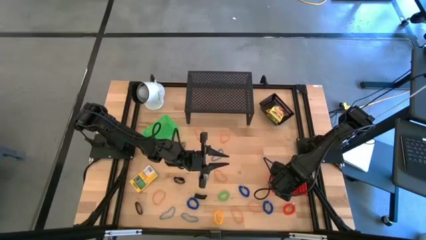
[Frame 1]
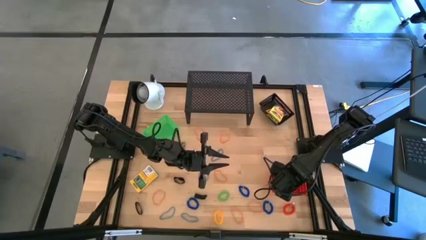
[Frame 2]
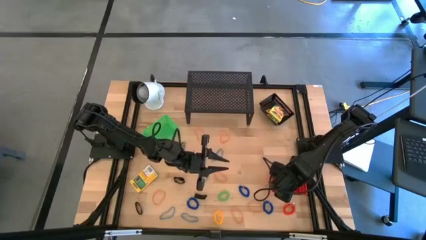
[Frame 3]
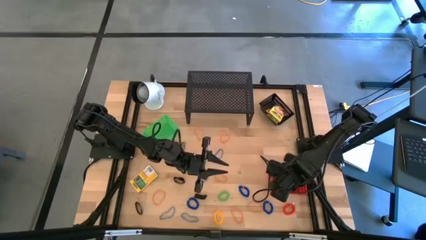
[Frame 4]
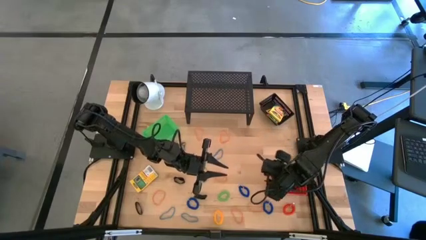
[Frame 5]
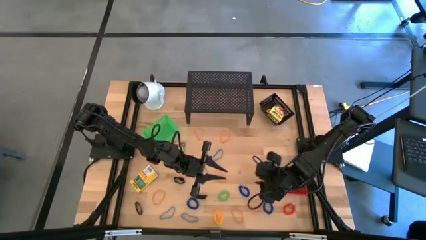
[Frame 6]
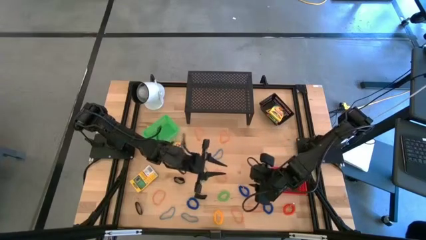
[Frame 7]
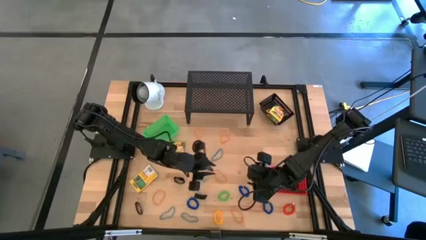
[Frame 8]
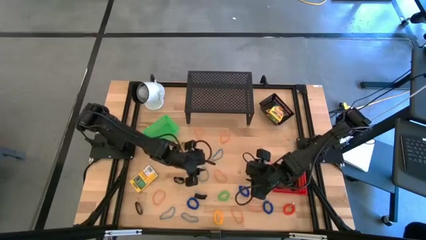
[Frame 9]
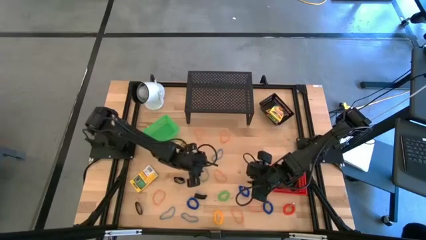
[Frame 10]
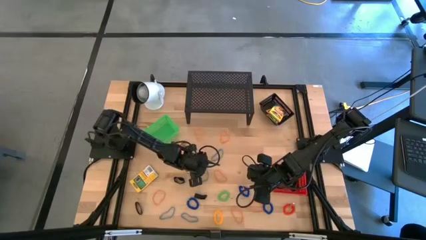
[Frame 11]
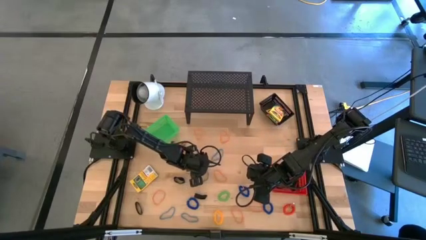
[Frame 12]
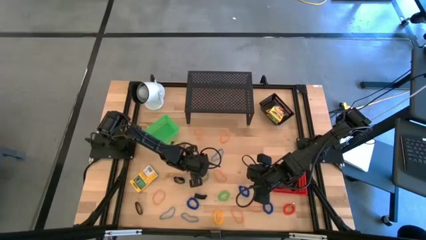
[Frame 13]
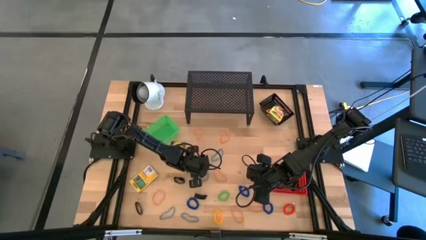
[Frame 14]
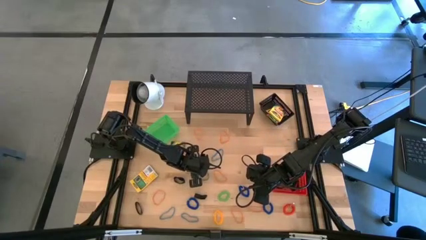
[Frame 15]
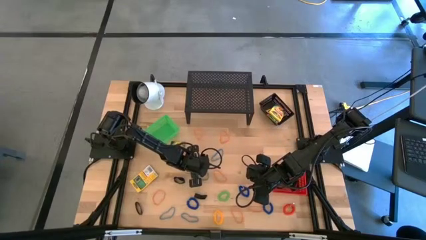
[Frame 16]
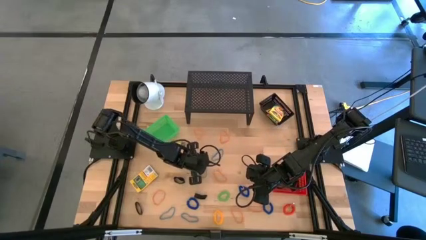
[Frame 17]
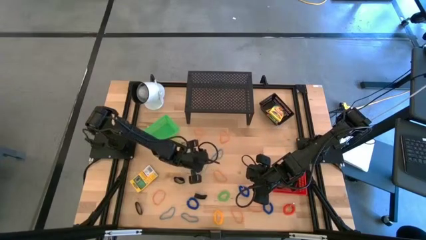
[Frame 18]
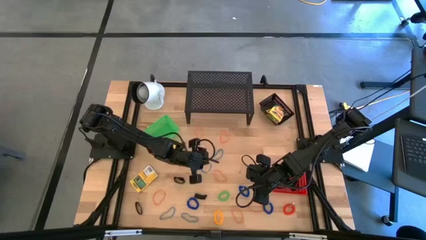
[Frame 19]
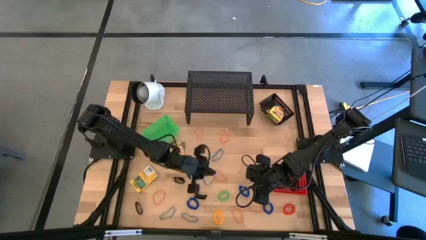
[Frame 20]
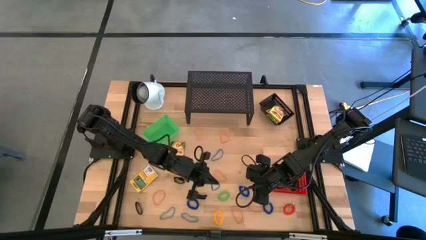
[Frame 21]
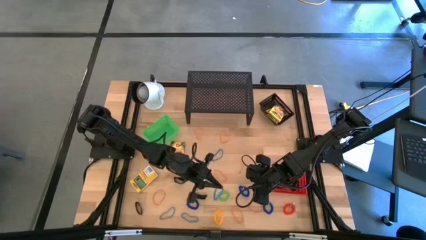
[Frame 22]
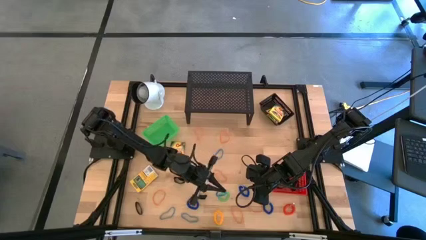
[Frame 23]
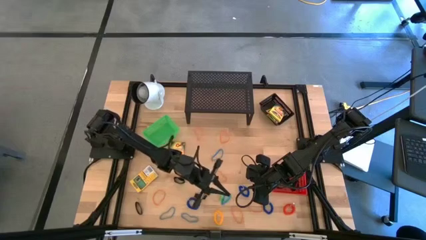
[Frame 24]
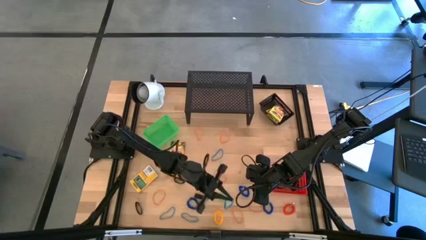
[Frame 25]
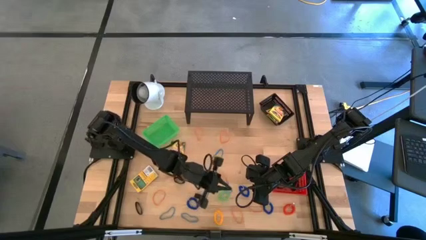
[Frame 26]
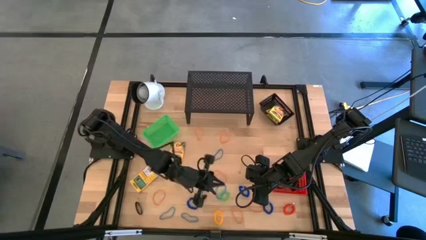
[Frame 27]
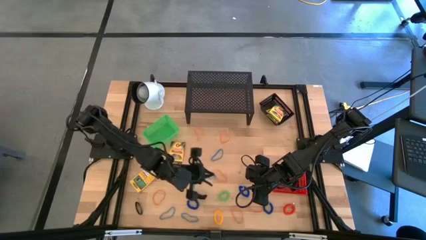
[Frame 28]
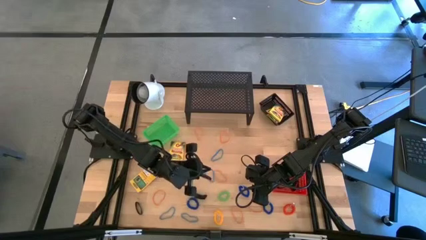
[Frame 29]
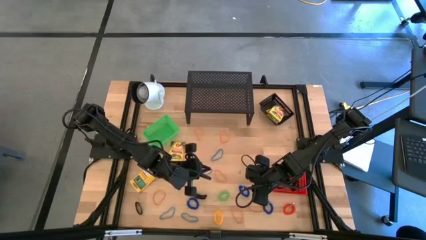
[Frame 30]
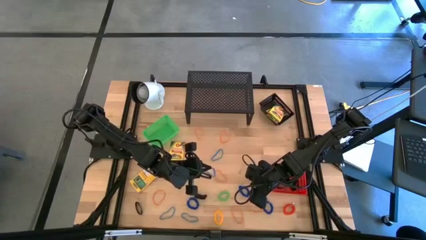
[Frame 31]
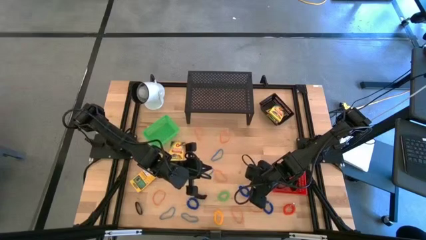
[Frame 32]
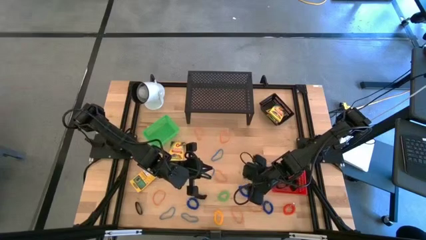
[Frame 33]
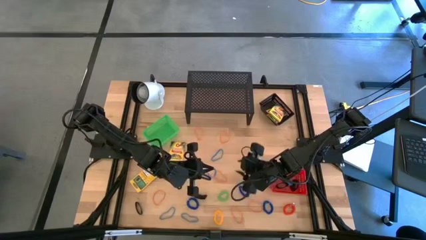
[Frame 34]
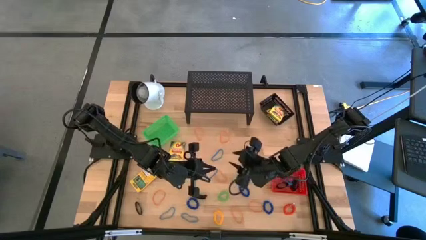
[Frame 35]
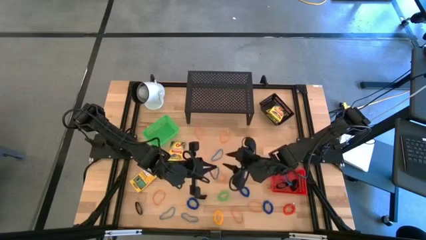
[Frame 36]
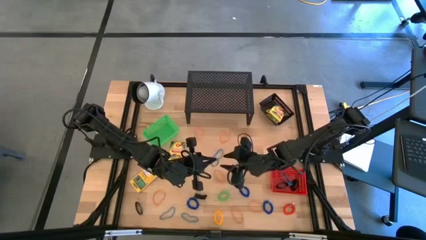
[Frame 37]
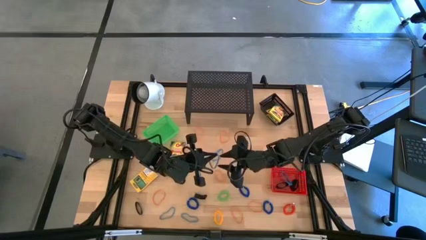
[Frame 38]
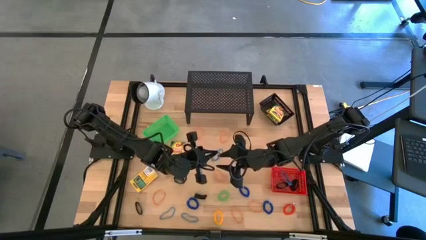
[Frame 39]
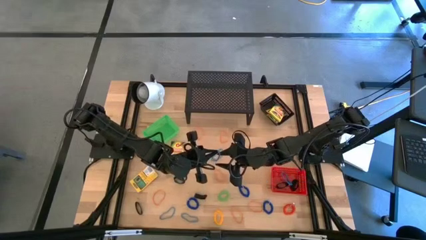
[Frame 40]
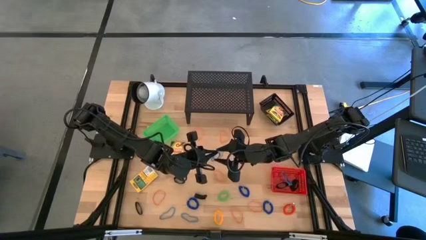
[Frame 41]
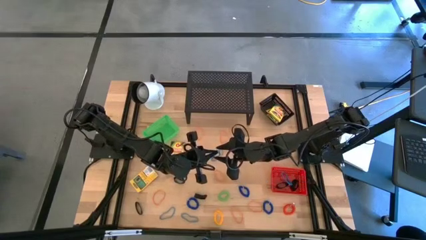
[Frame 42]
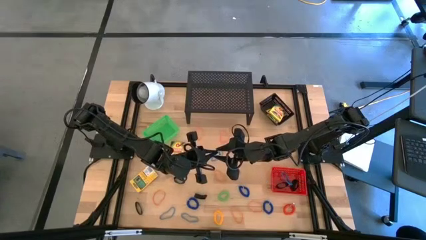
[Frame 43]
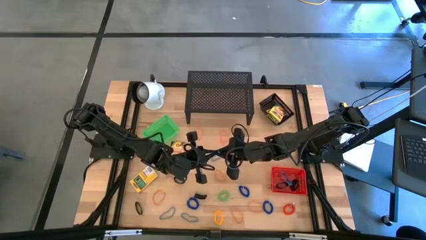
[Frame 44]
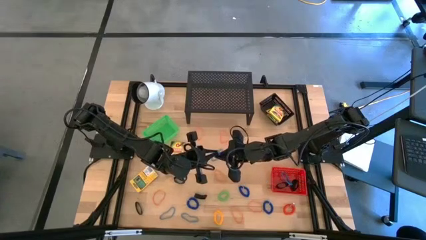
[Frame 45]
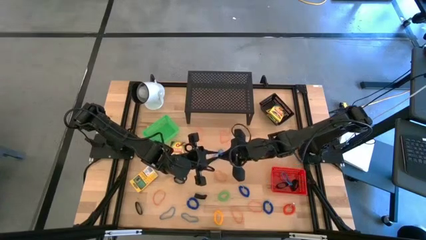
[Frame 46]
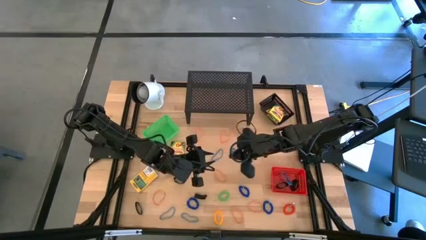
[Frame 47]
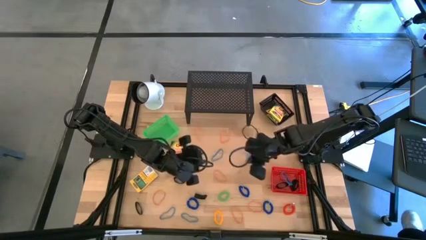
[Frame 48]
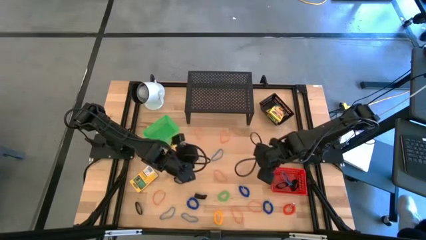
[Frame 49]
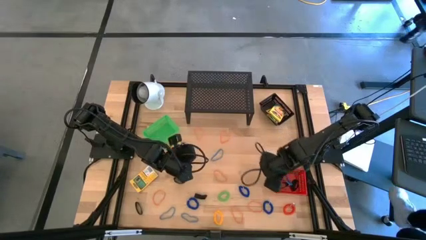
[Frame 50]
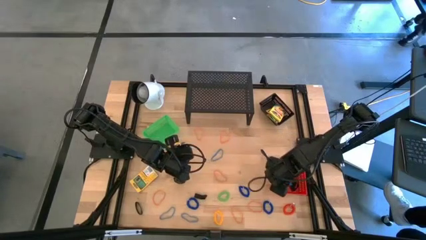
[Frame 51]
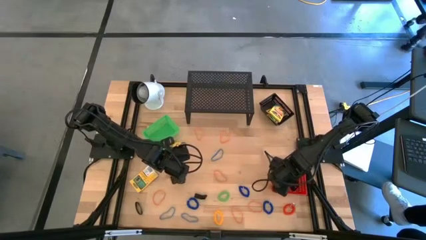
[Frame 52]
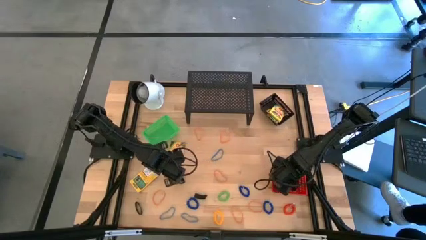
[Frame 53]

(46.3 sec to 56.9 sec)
Task: Pick & Place Office Desk Supplies
Put the blue rubber band into the red bin

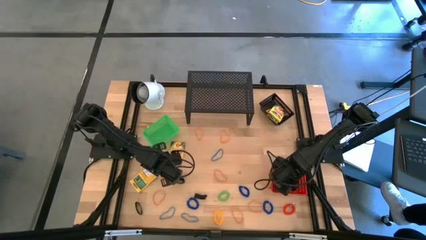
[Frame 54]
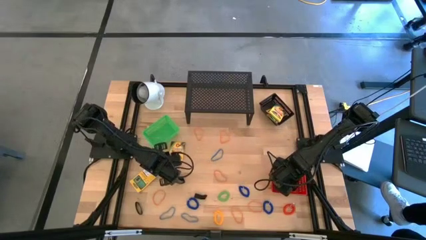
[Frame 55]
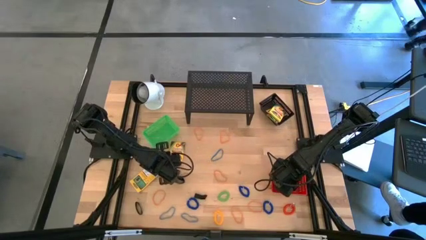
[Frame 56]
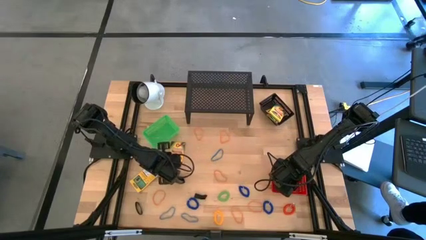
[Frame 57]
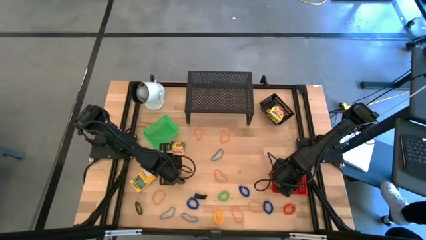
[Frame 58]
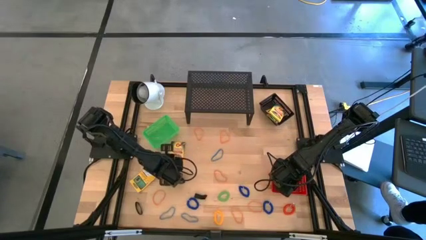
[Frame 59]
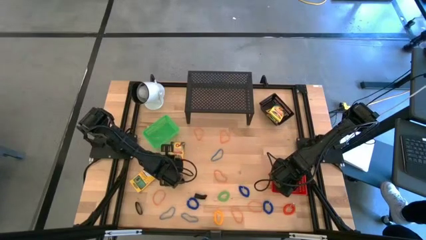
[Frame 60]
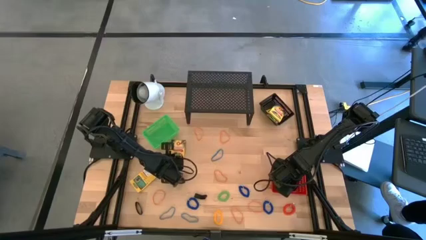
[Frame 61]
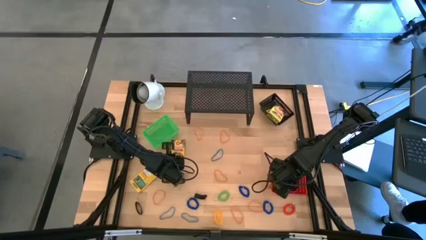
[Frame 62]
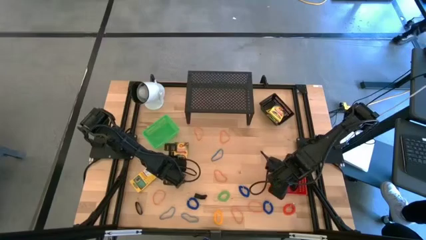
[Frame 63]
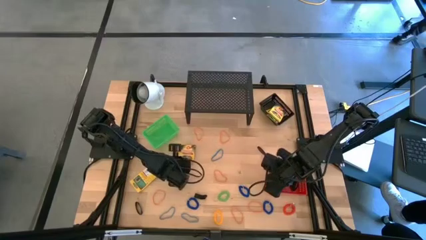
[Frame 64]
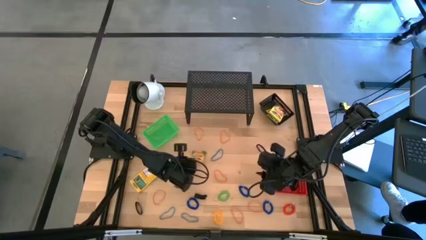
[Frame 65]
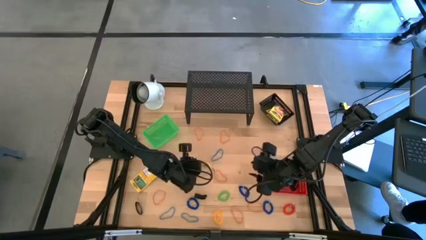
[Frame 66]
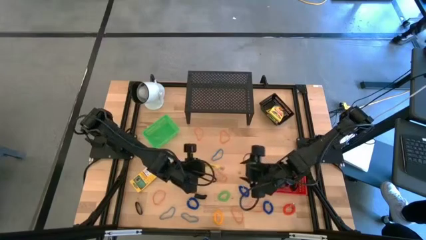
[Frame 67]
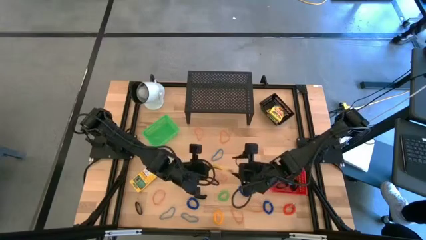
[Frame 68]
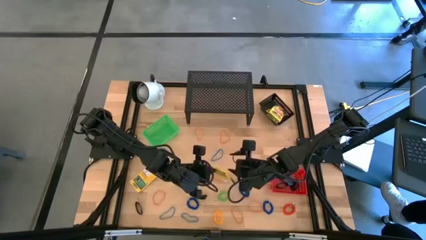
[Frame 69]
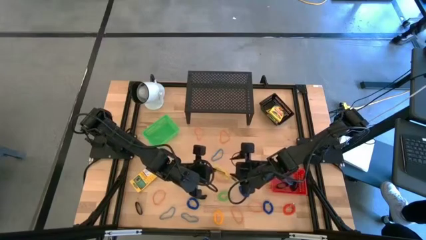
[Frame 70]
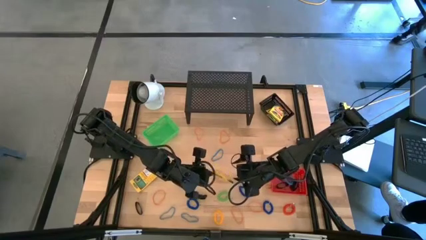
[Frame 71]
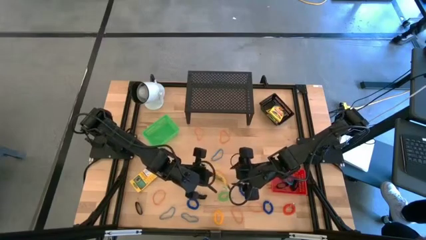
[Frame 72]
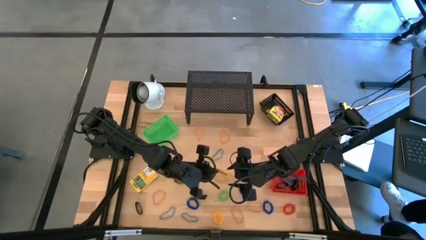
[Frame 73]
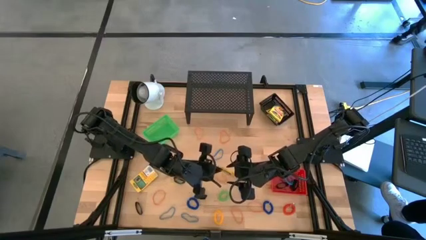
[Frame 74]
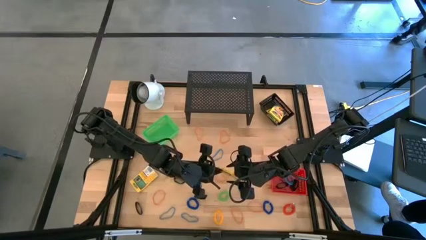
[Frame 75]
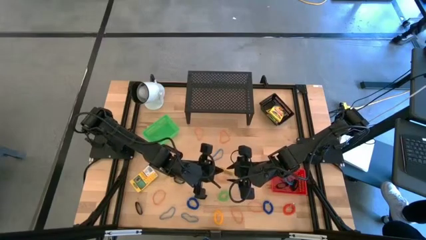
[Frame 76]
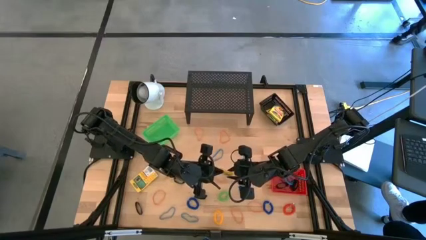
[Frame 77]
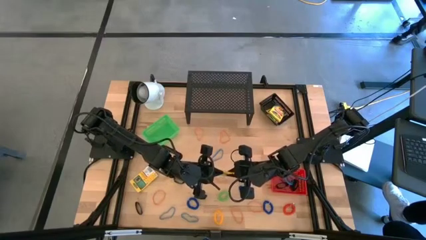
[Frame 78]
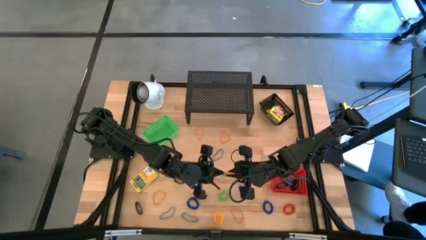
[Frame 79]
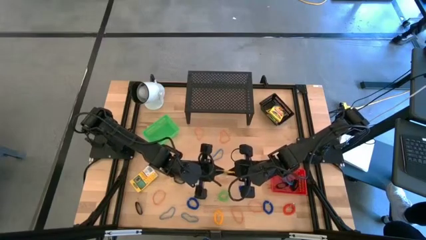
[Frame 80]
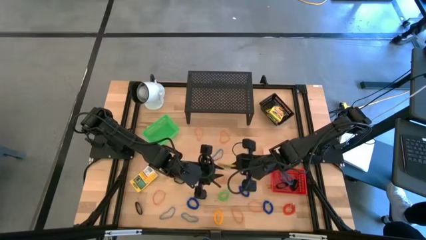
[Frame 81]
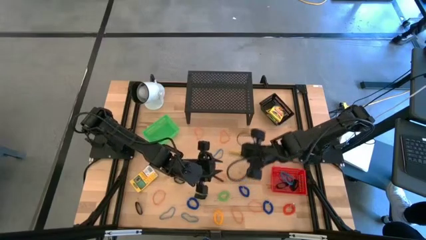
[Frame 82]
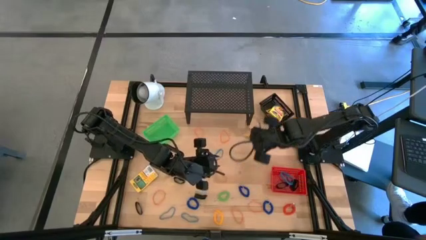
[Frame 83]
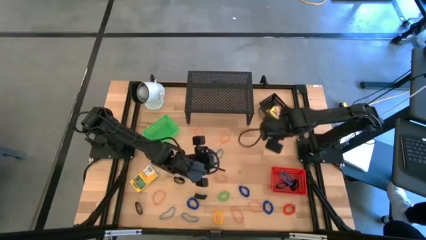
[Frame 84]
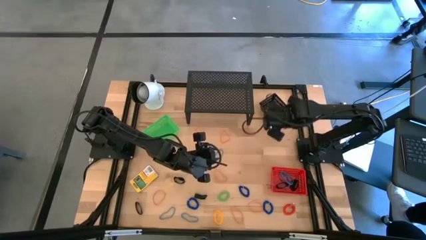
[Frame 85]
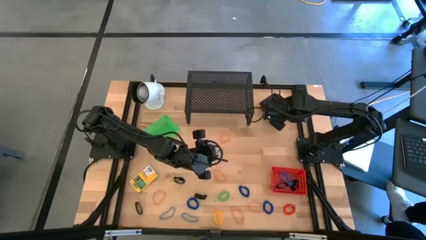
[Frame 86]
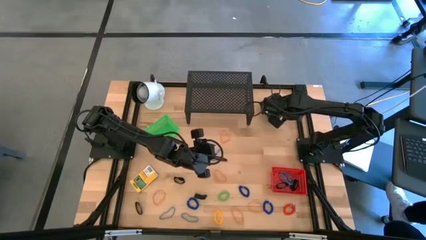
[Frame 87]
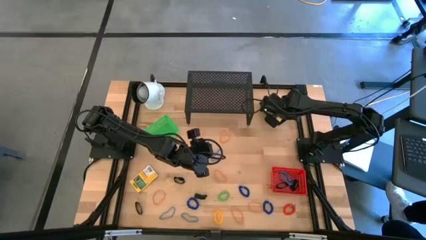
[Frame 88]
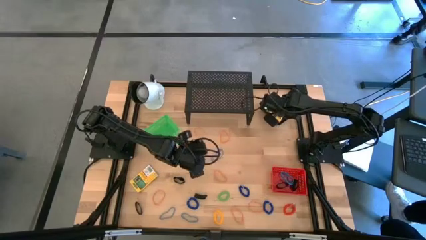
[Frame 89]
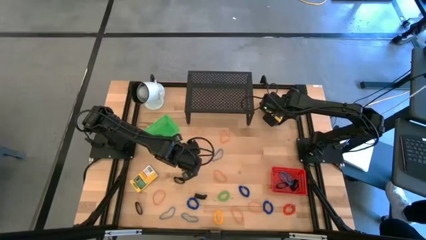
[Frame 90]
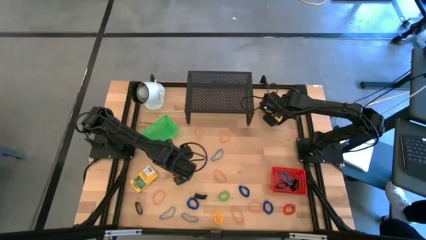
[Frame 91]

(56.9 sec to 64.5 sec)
Put the top crayon box into the black bin
